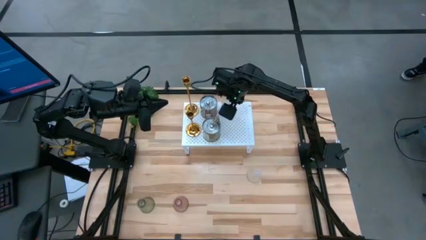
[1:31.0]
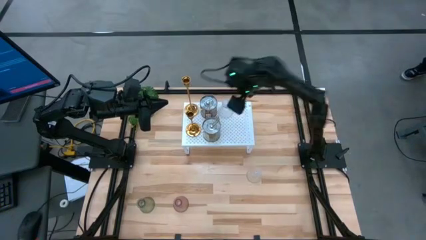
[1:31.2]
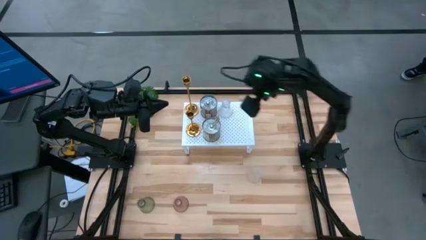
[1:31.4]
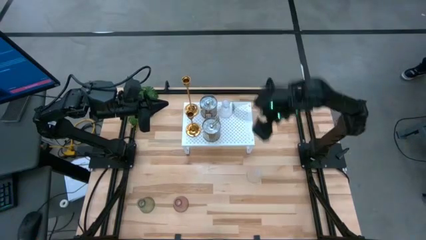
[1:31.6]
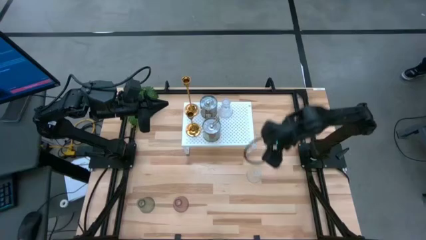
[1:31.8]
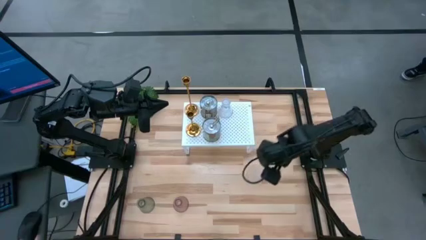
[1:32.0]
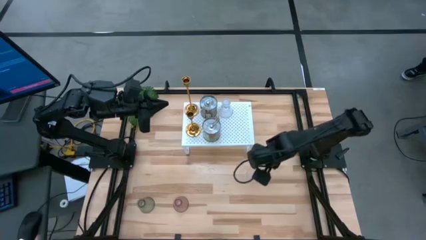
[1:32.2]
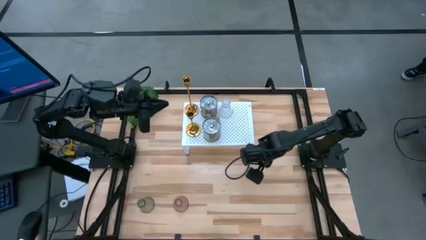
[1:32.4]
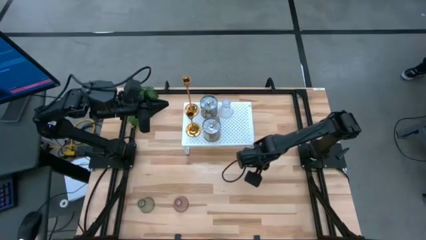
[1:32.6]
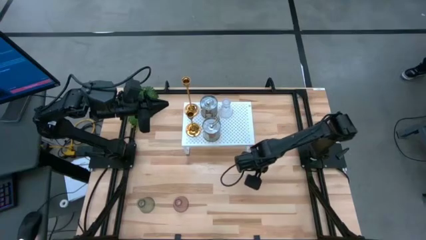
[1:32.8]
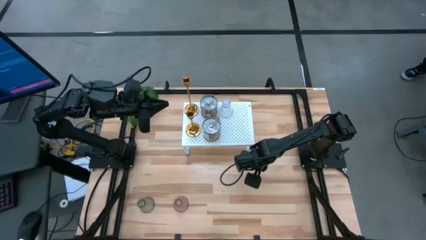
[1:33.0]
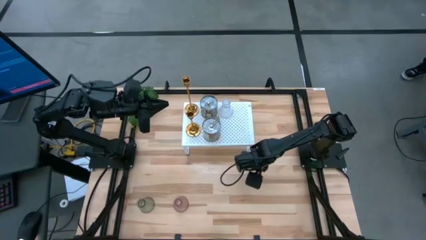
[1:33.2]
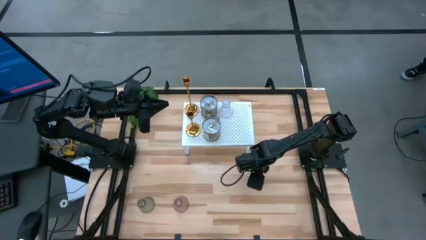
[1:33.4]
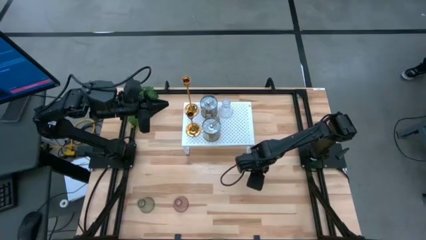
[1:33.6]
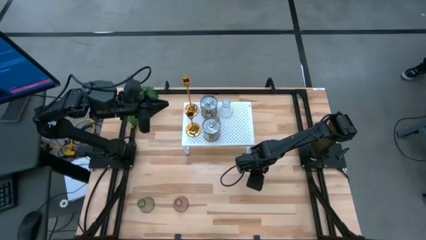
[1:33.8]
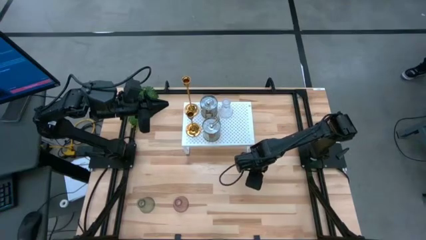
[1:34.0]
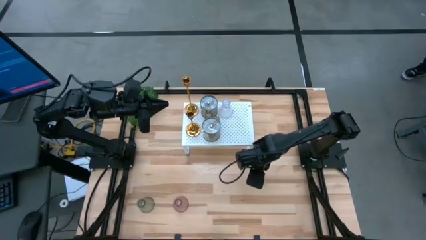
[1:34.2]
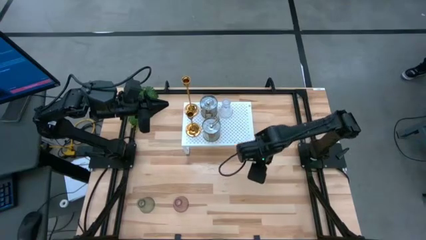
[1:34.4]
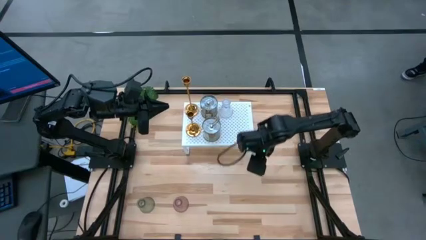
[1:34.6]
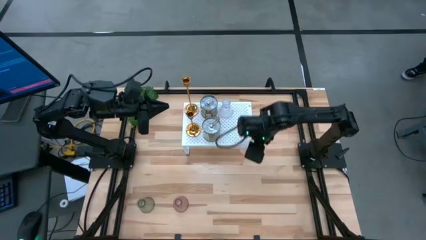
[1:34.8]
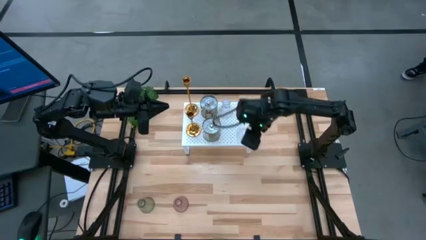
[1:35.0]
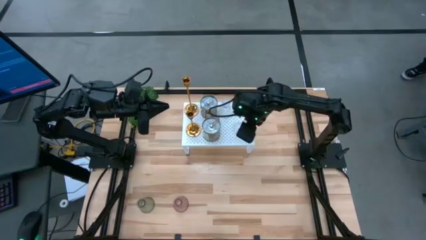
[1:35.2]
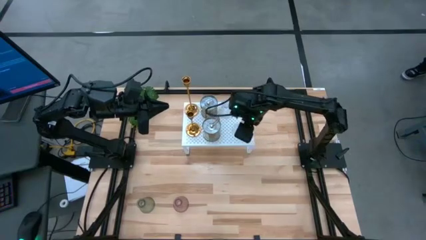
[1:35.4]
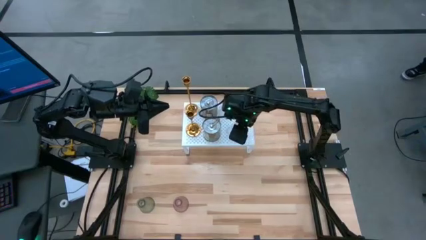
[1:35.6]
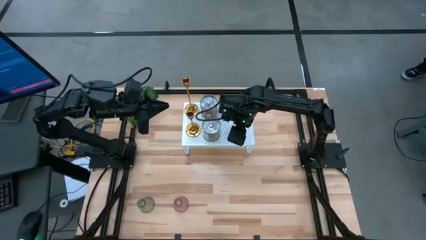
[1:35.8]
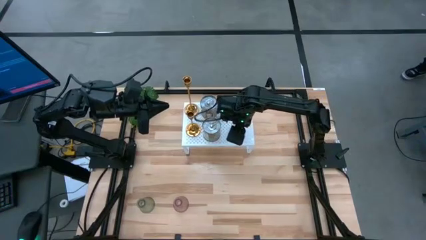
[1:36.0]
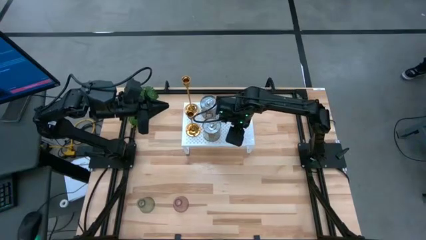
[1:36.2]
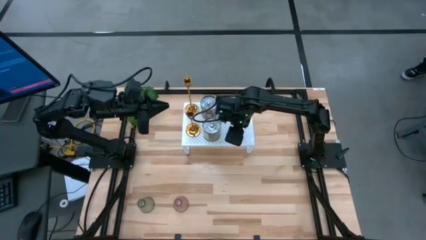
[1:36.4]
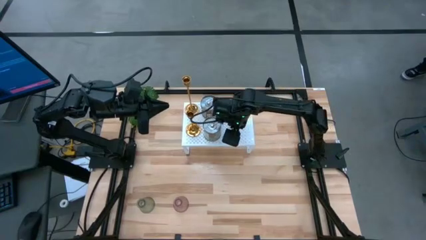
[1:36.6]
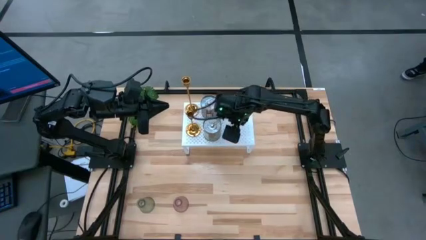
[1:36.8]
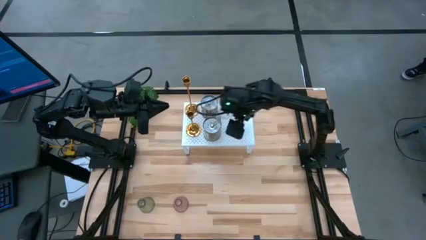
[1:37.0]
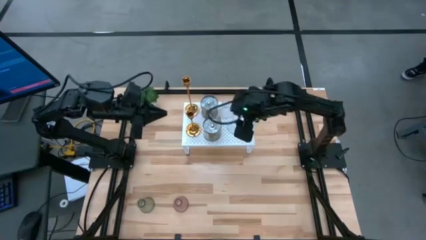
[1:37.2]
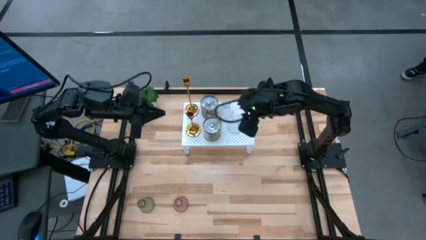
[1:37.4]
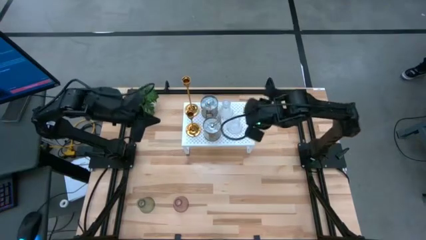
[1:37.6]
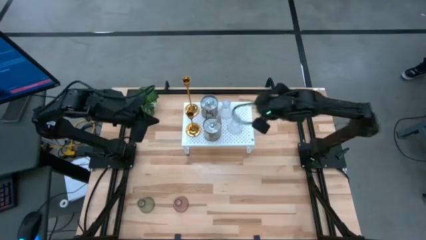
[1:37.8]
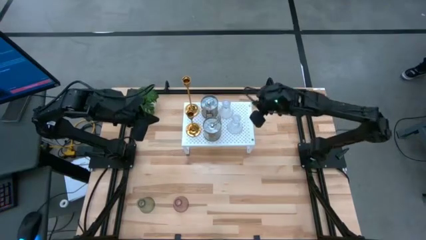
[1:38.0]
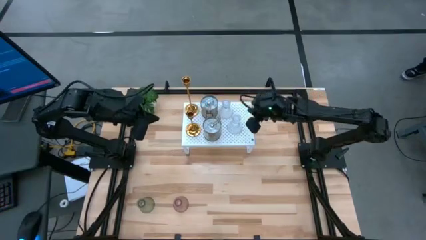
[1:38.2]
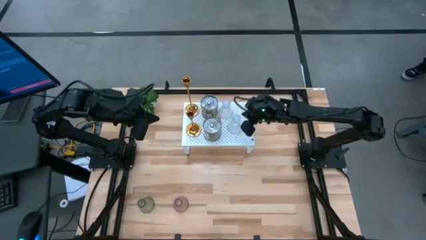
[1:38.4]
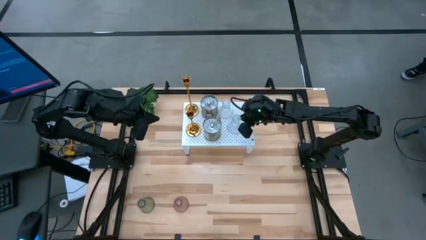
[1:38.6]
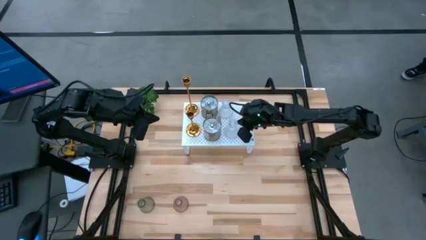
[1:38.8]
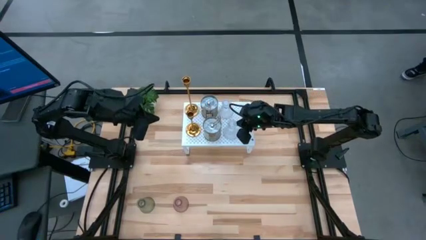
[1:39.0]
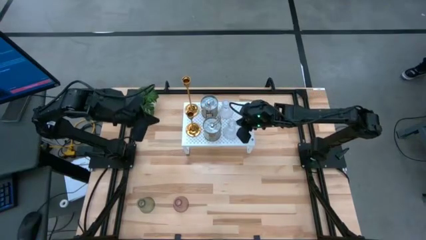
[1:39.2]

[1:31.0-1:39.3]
Task: Pick & Place candle stick holders
Put the transparent glass candle holder on the shelf
